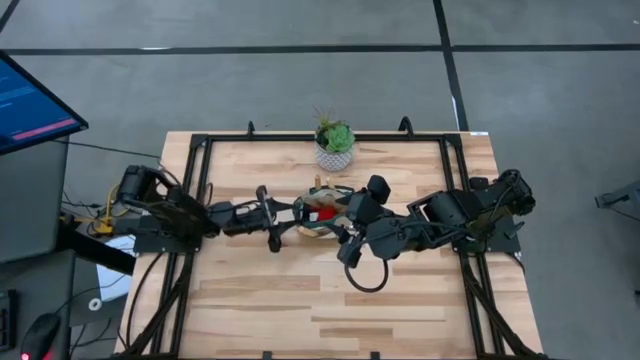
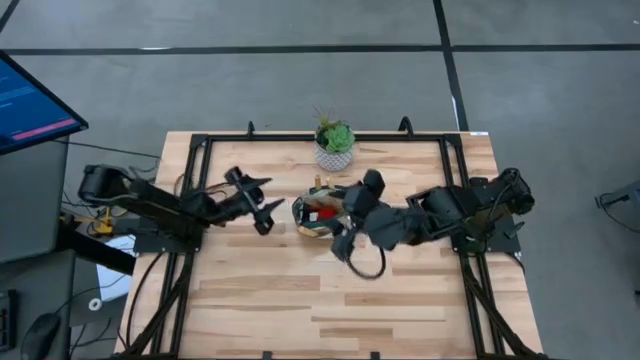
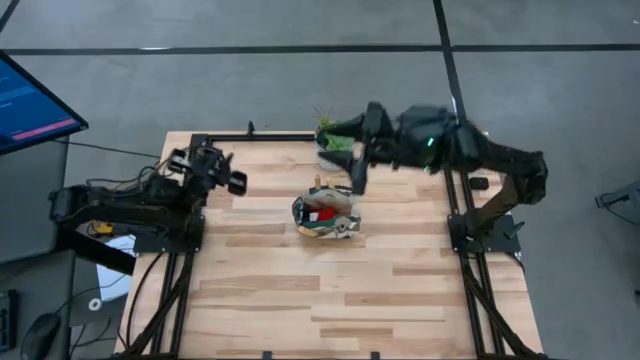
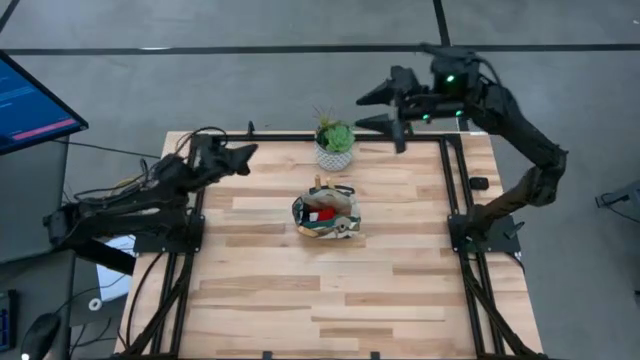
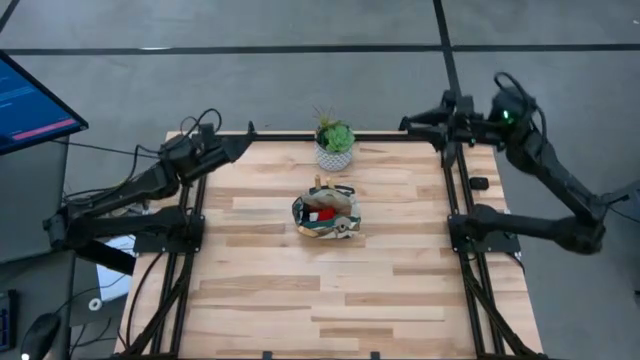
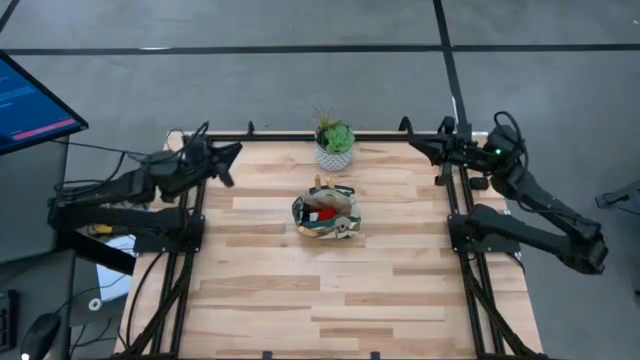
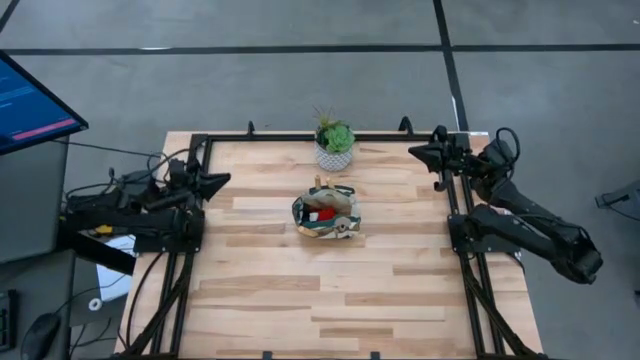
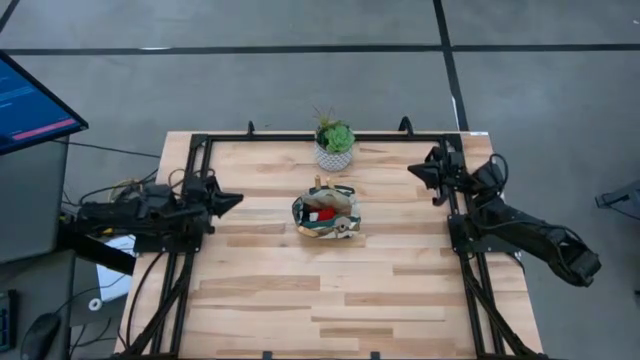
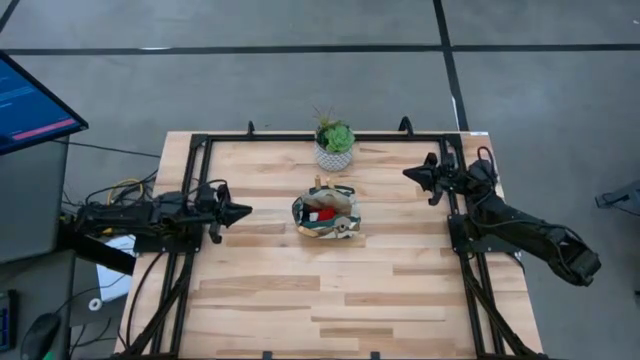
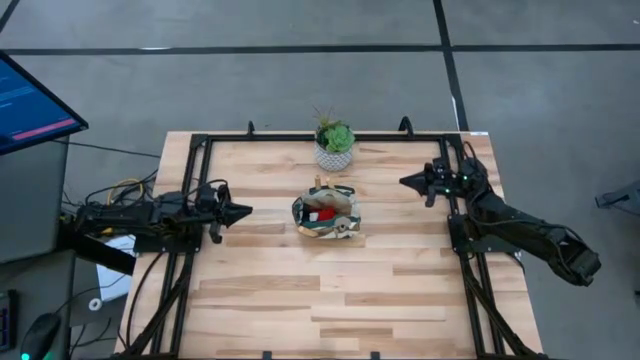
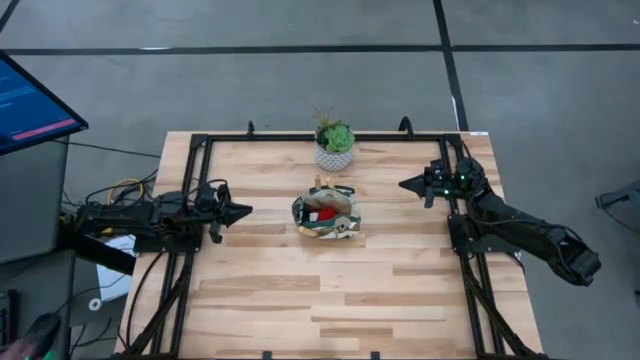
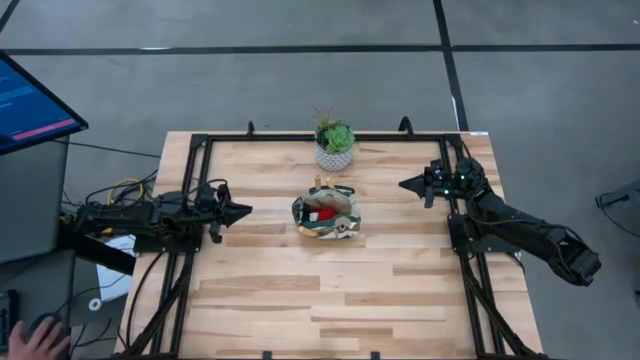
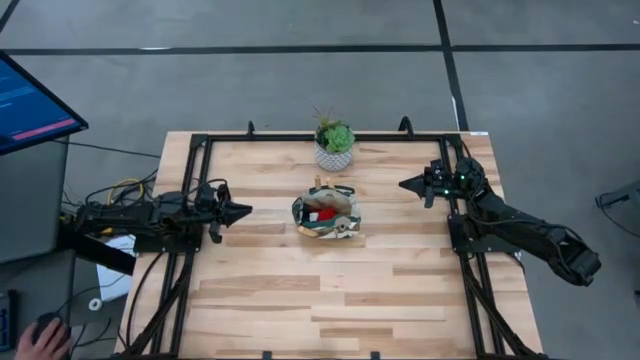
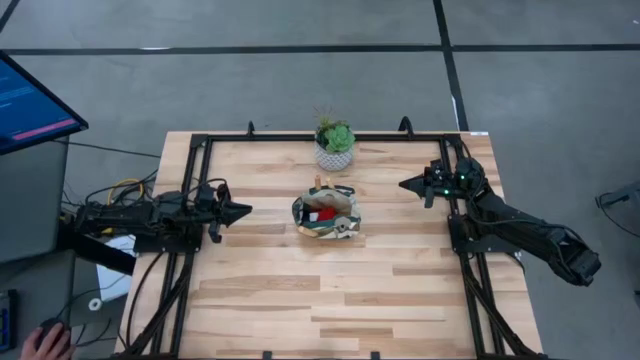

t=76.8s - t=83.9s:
Task: Pick & Place Garden tools in Gardening bag
Return to Home Position

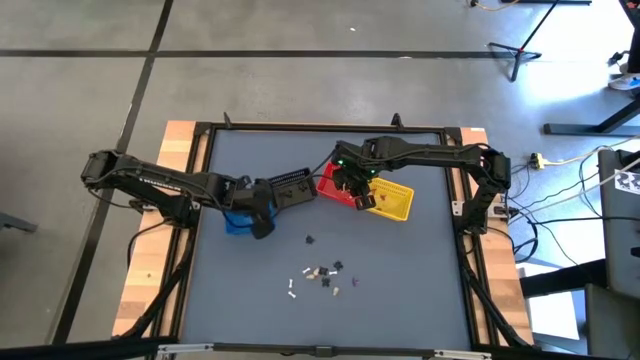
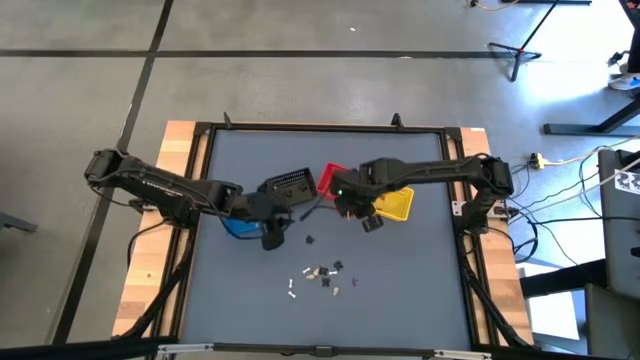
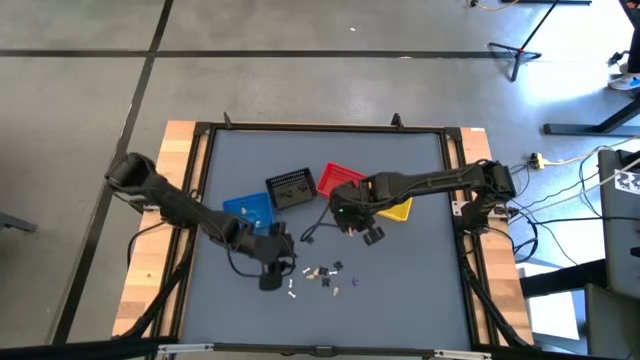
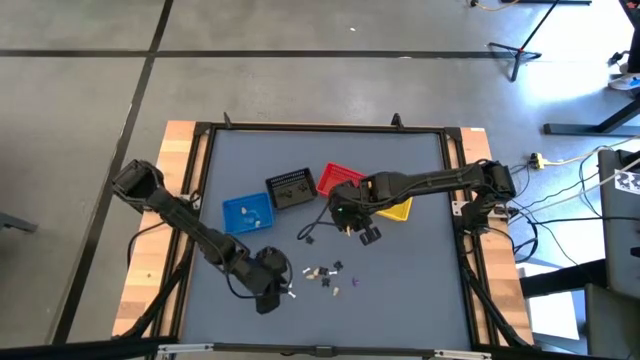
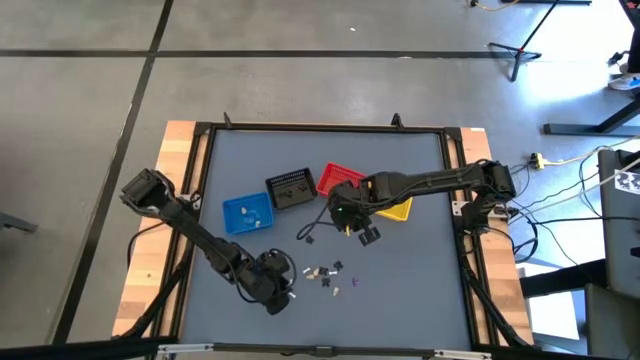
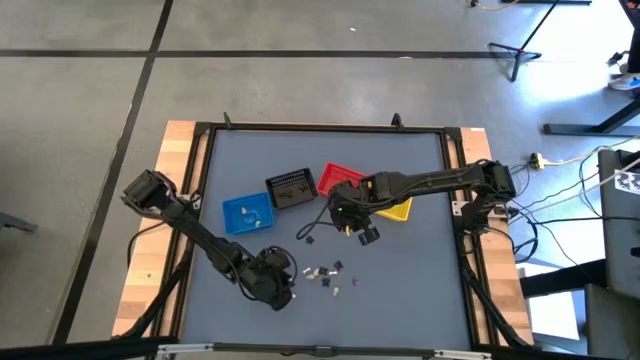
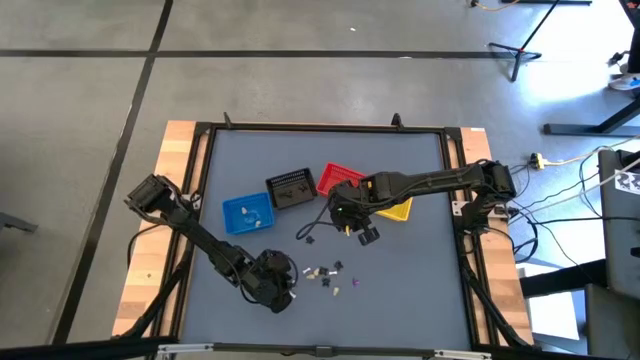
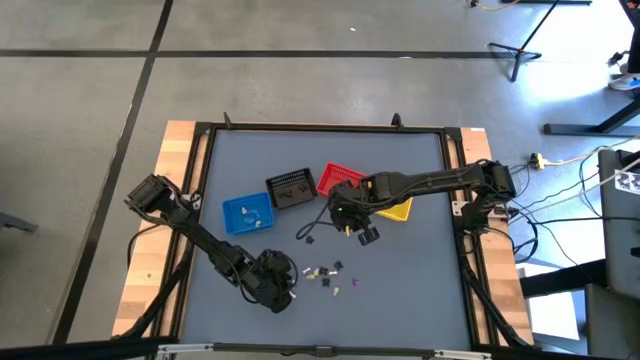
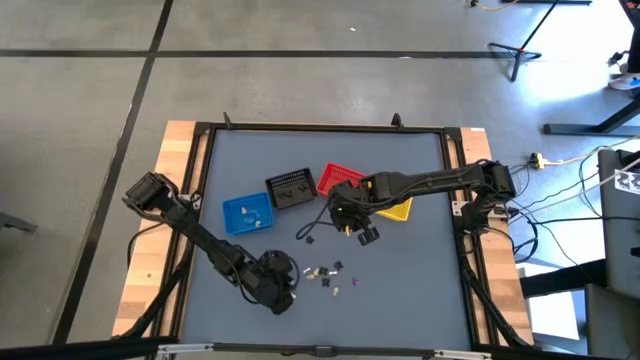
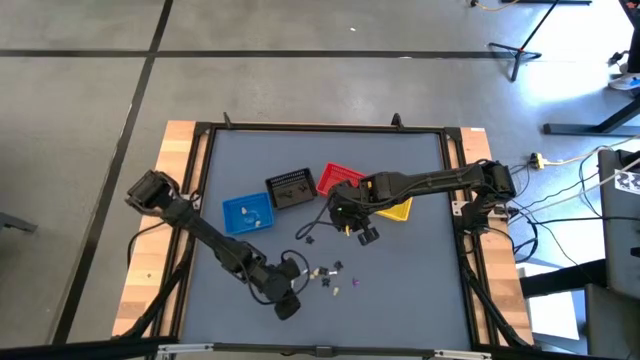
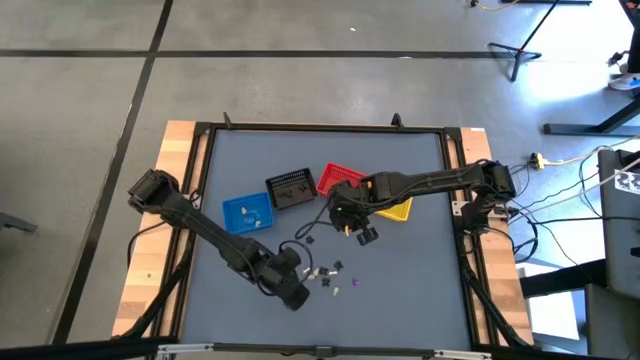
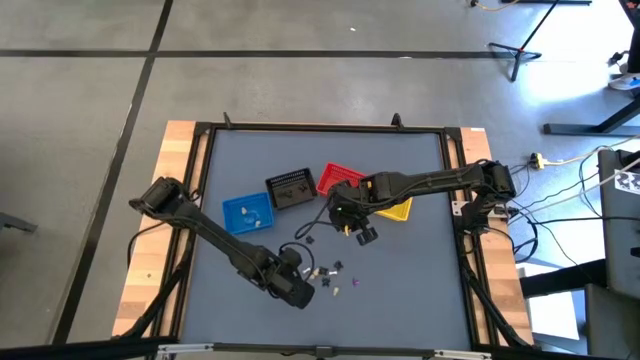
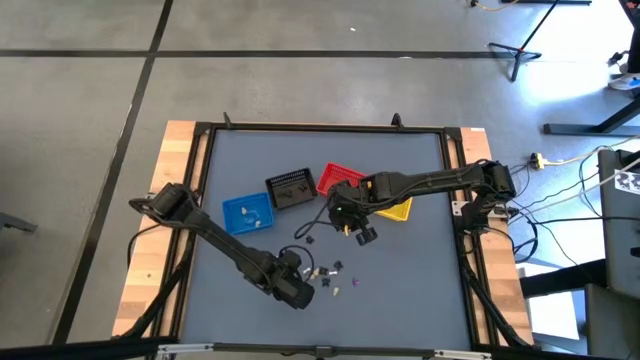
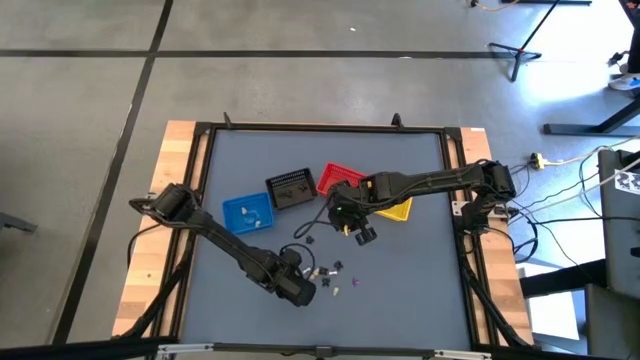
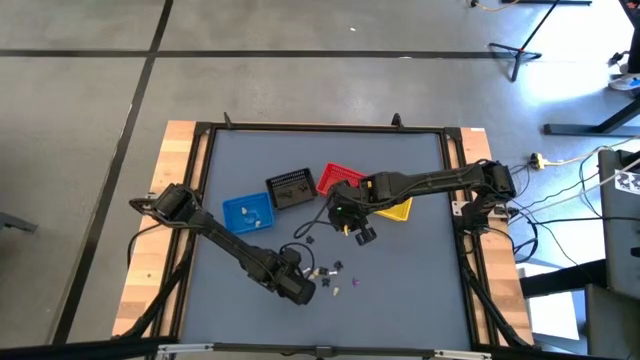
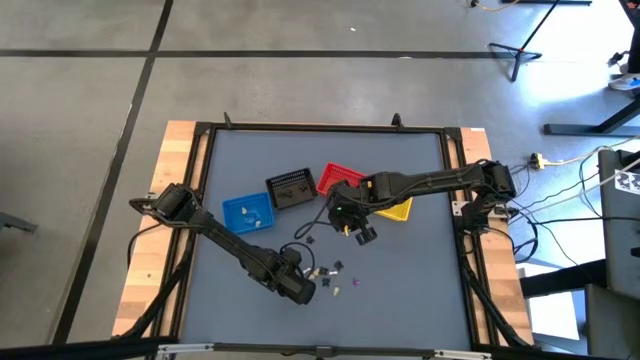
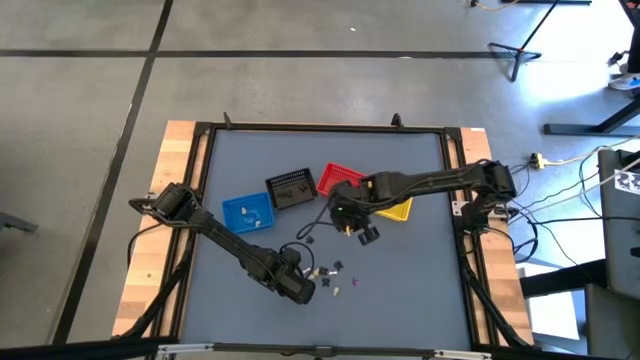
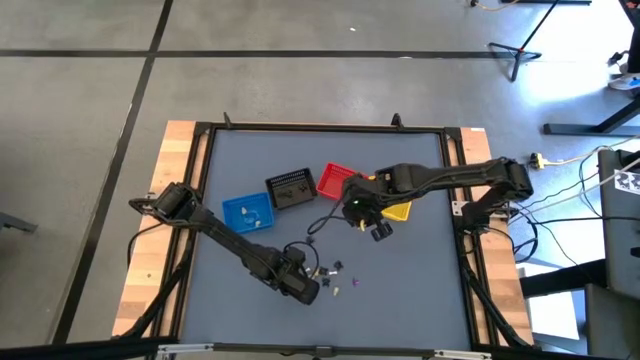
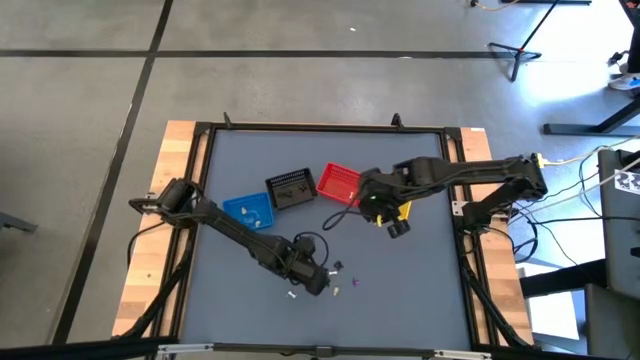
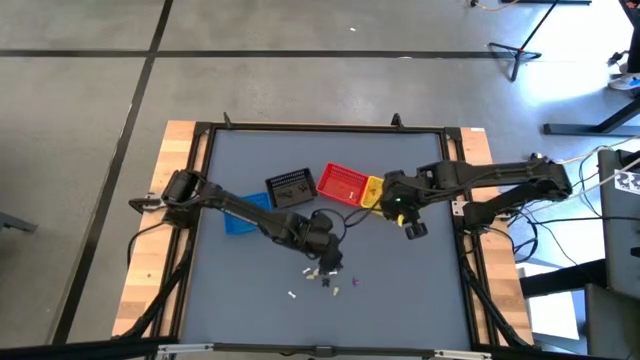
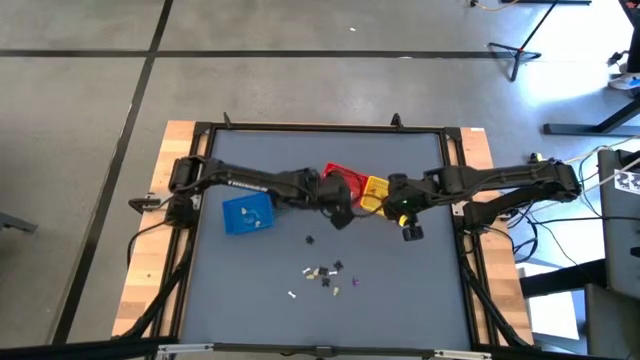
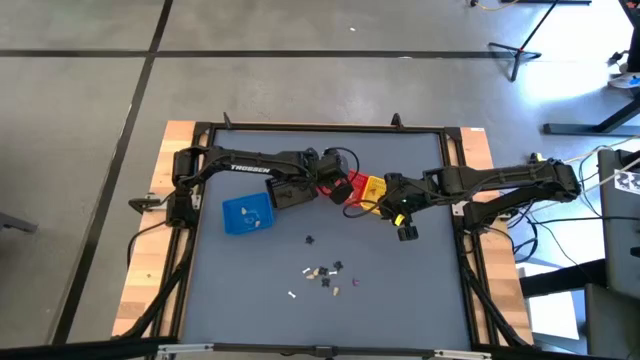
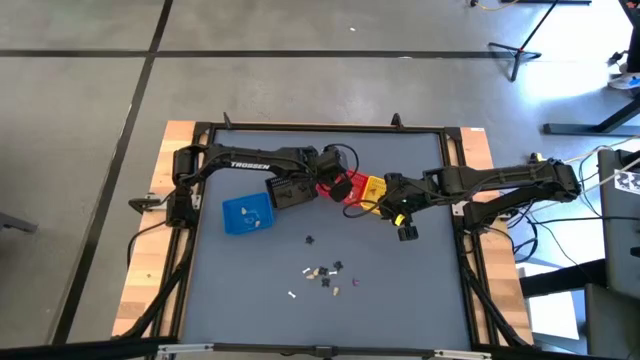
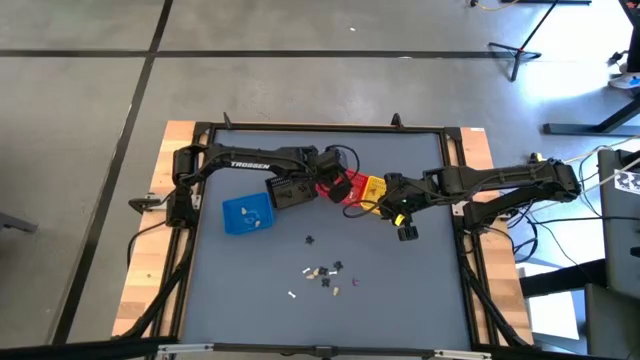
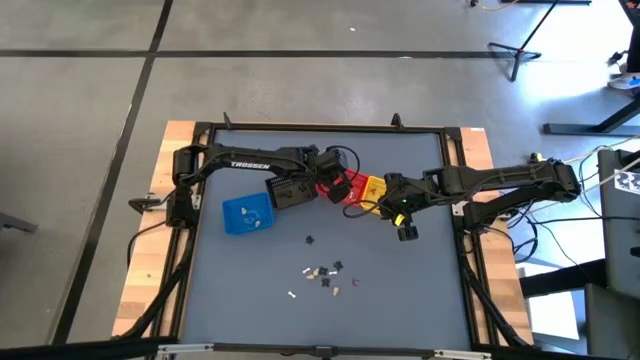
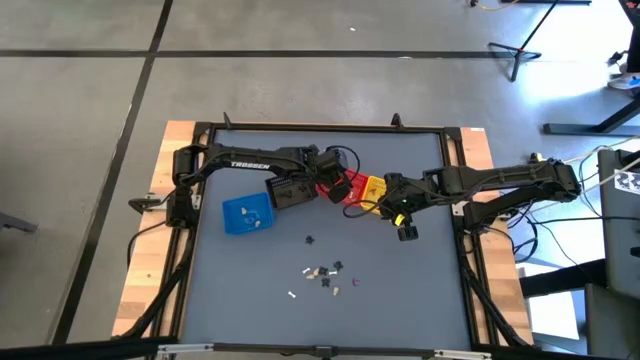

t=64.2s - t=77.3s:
Task: Sort Halloween decoration
Put the white bone toy into the red bin
